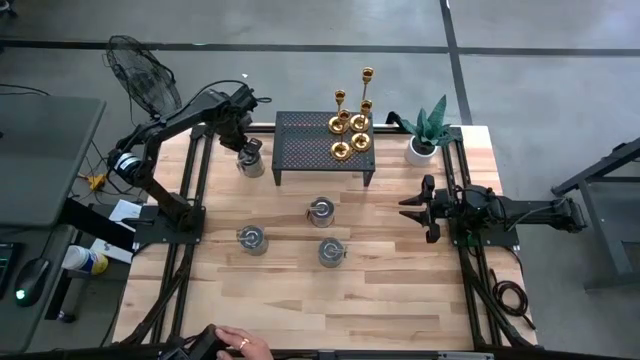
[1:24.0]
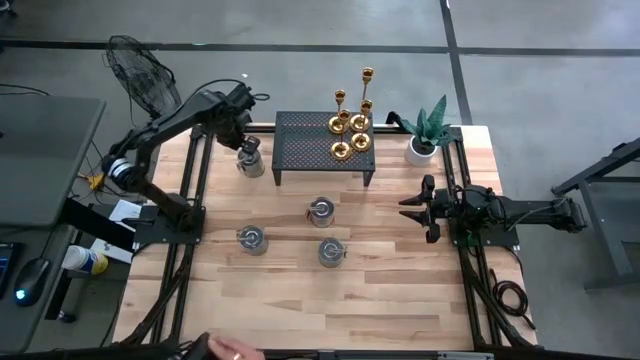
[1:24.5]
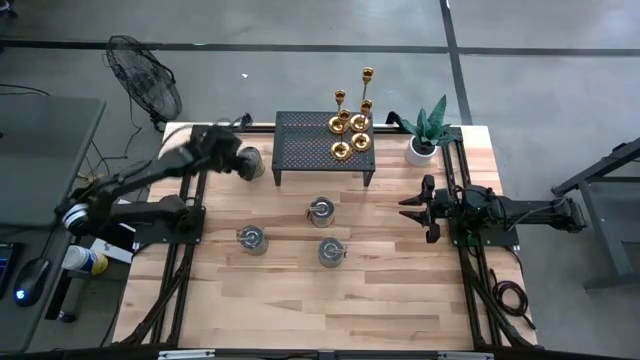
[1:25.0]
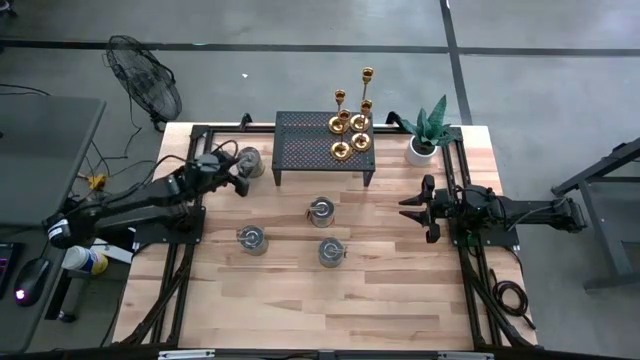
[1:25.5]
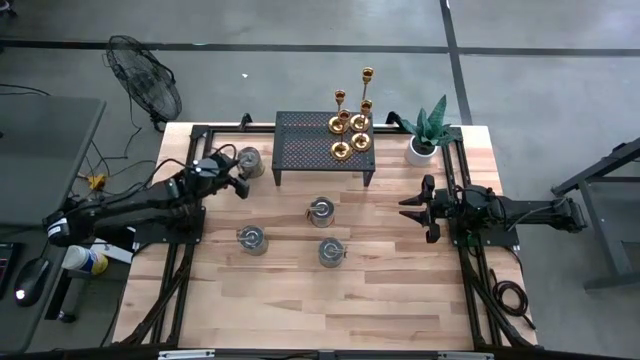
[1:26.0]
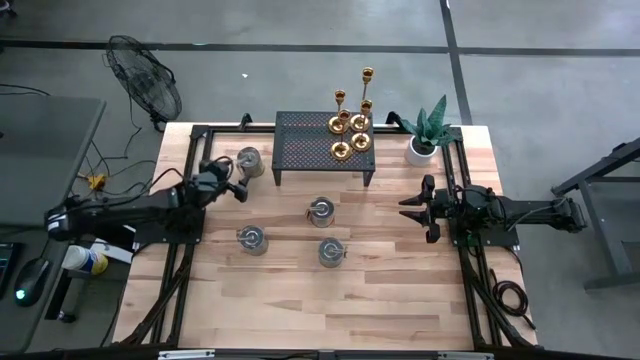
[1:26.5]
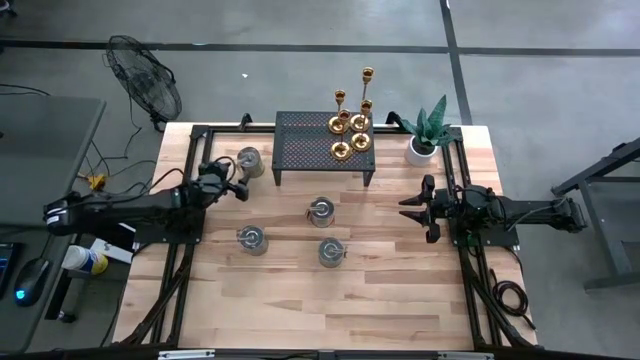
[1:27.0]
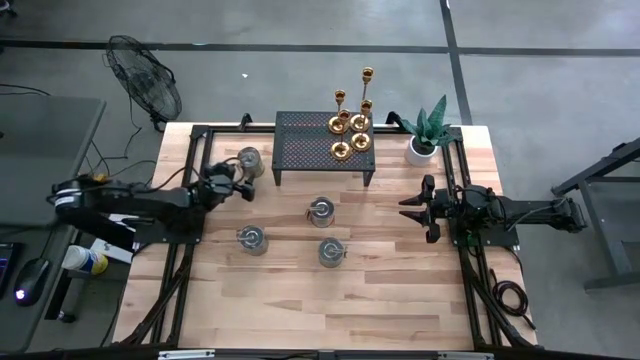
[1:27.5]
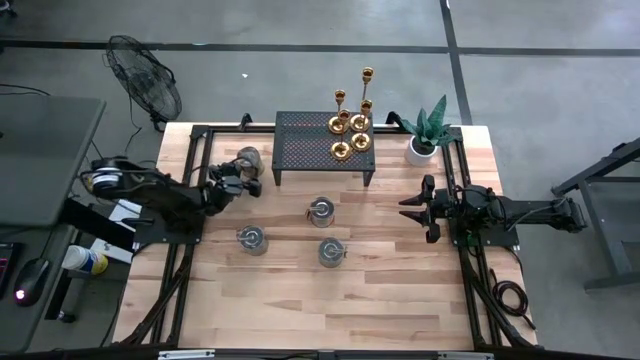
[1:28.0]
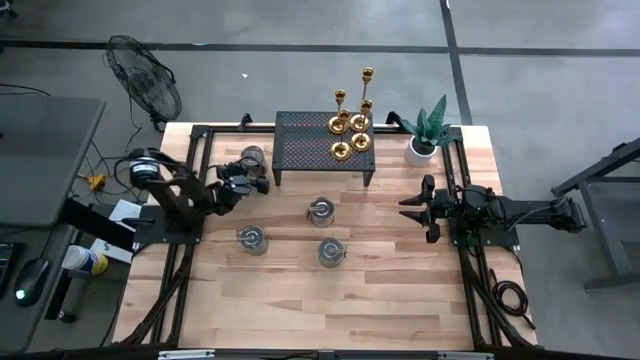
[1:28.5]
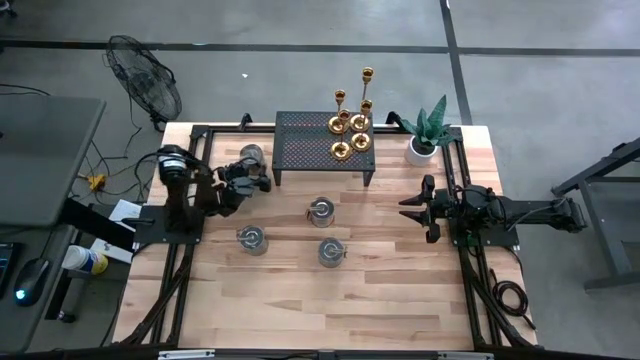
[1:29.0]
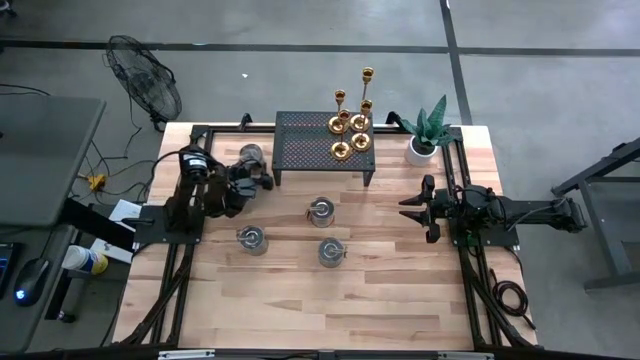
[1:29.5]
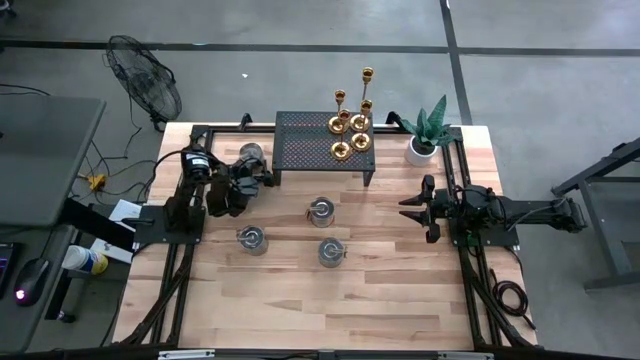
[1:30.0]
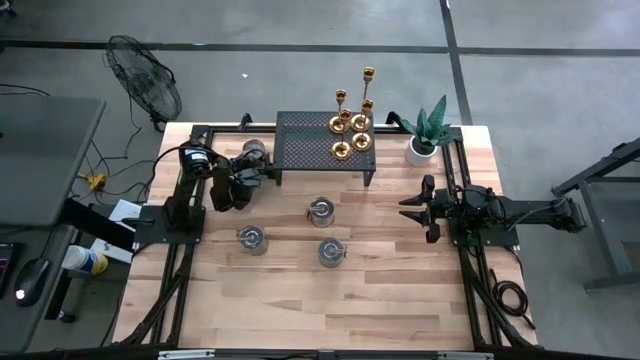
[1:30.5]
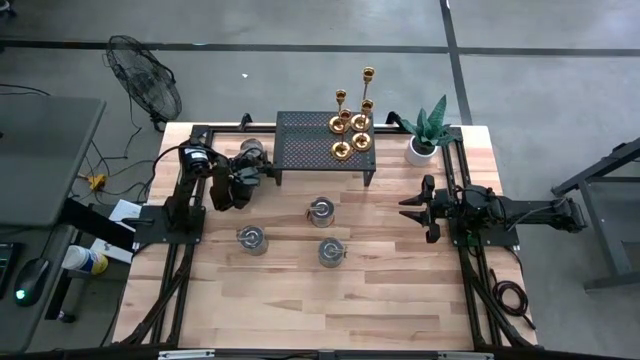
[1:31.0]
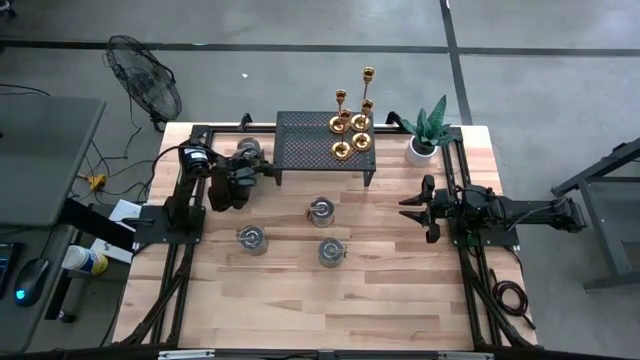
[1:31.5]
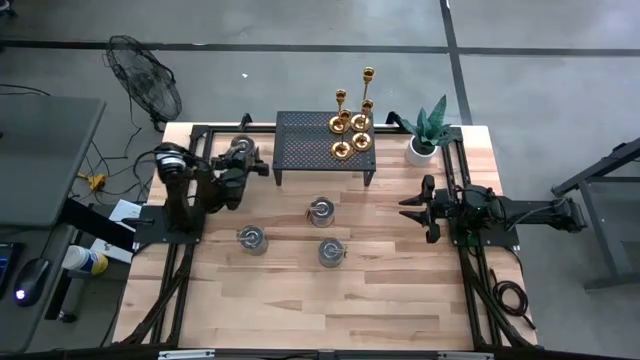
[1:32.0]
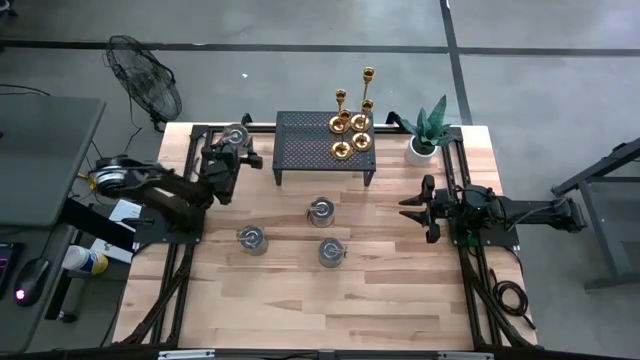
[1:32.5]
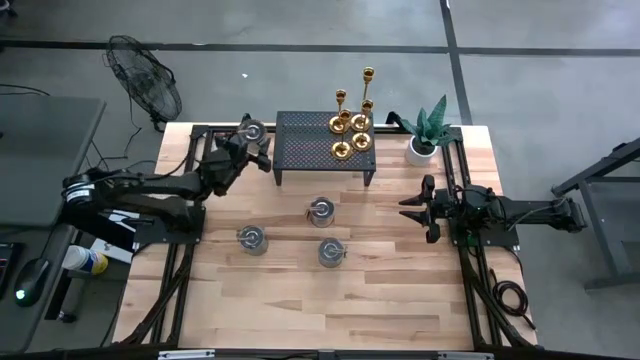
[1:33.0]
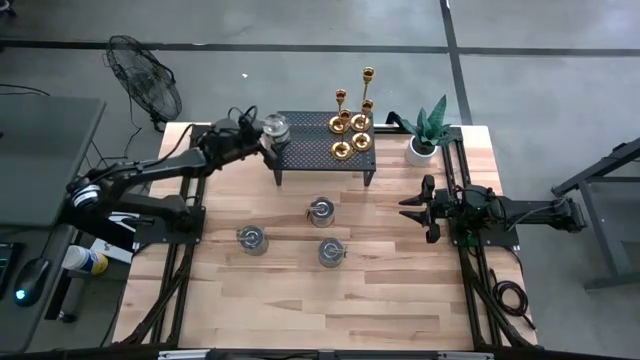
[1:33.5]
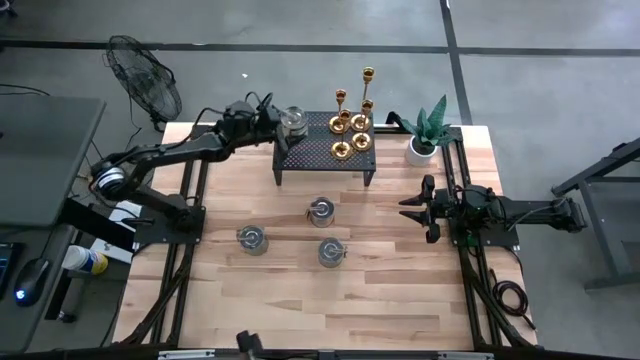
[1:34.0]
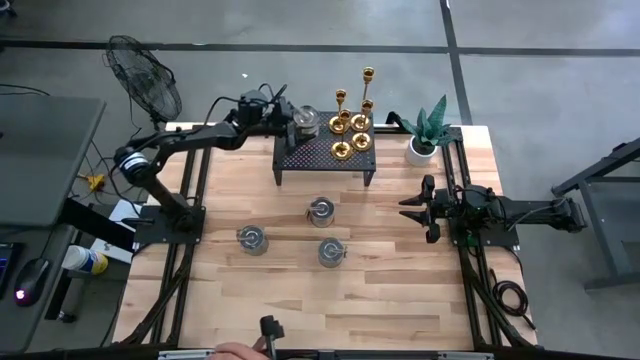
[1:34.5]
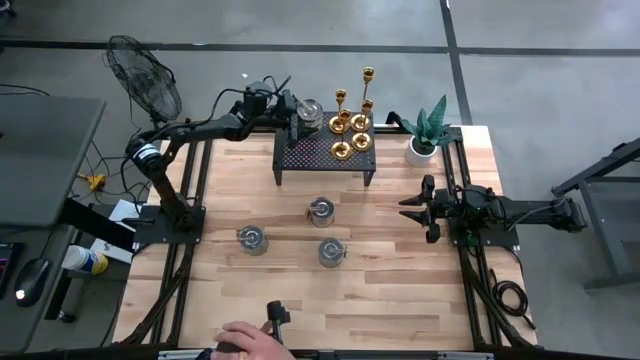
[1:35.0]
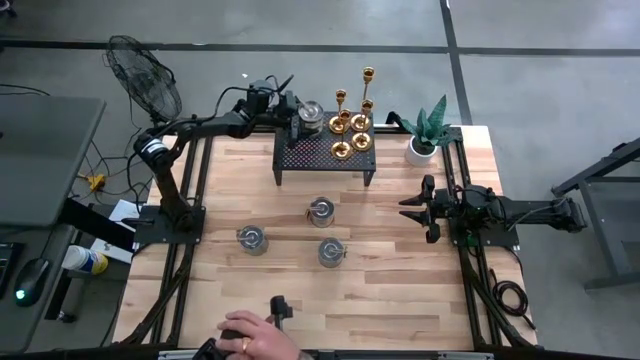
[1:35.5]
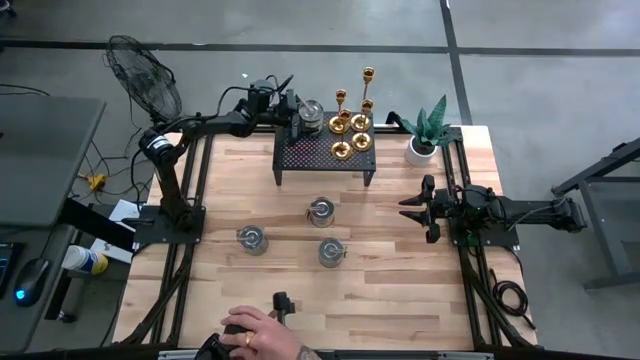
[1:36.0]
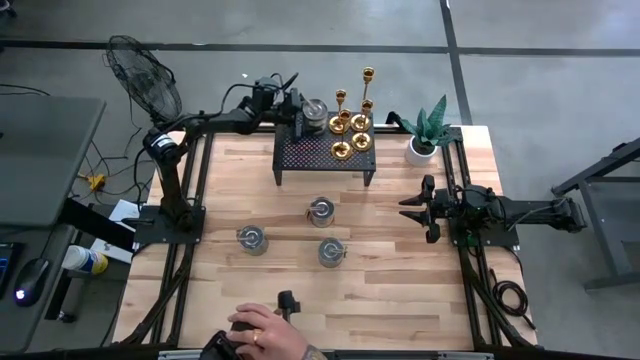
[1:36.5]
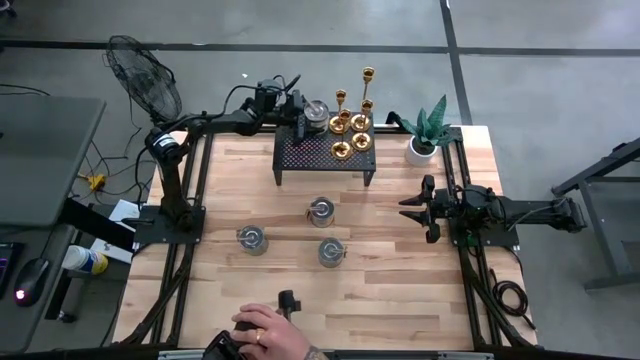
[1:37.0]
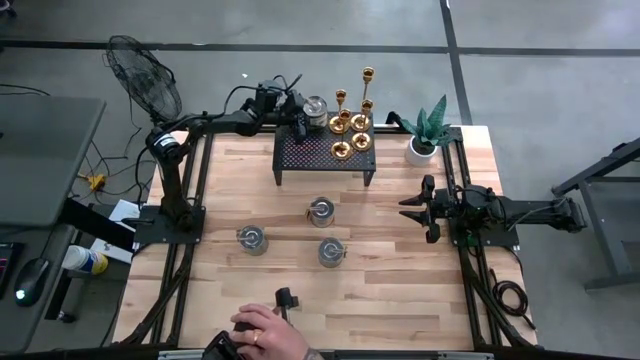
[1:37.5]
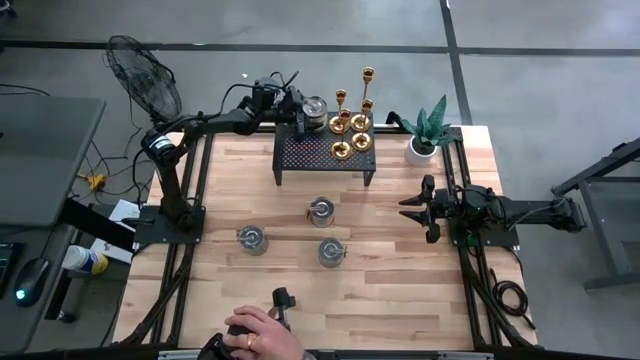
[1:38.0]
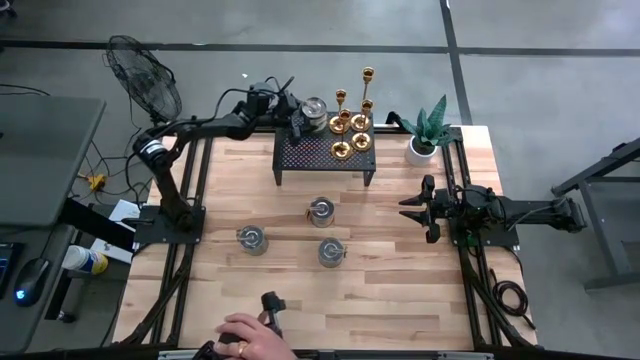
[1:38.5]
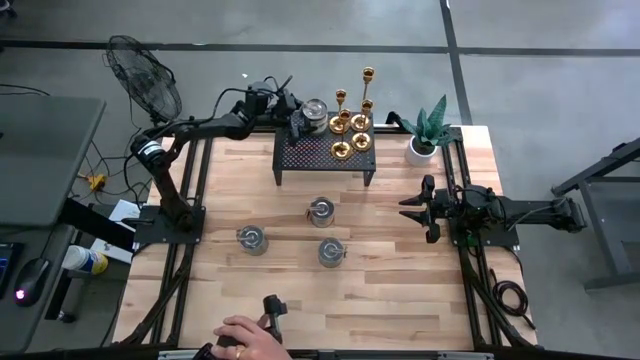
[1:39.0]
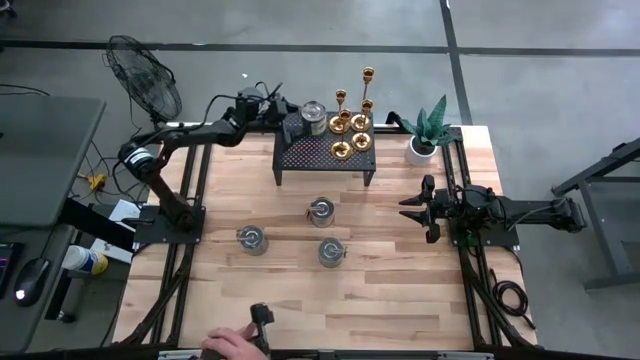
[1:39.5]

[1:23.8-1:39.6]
Task: Pick & Place candle stick holders
Put the scented candle on the shelf

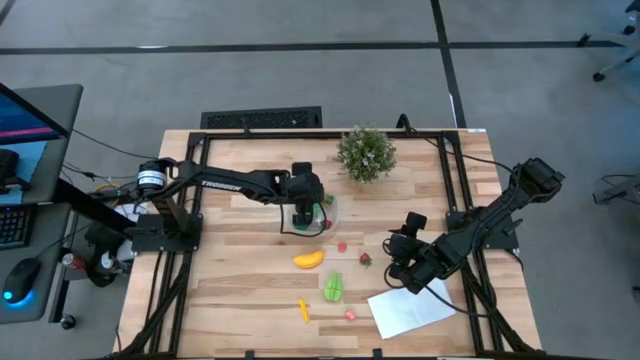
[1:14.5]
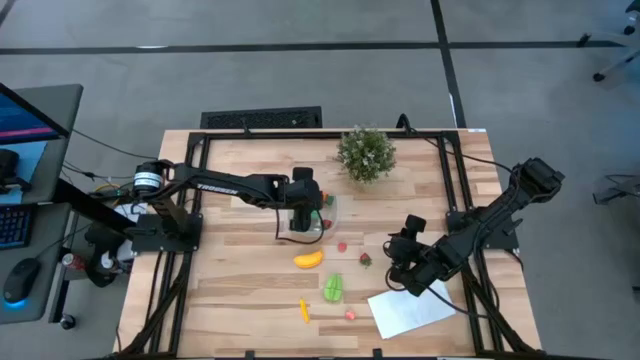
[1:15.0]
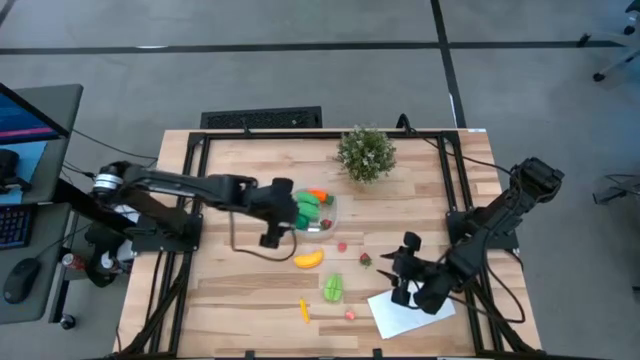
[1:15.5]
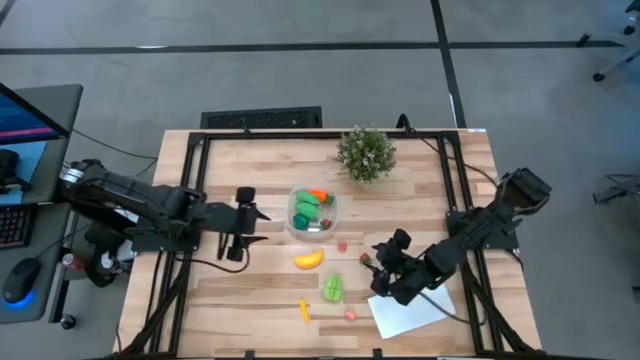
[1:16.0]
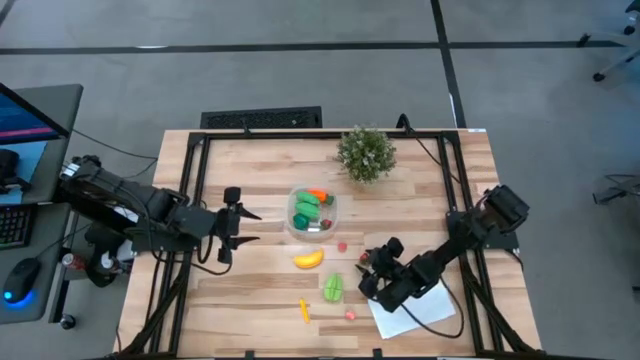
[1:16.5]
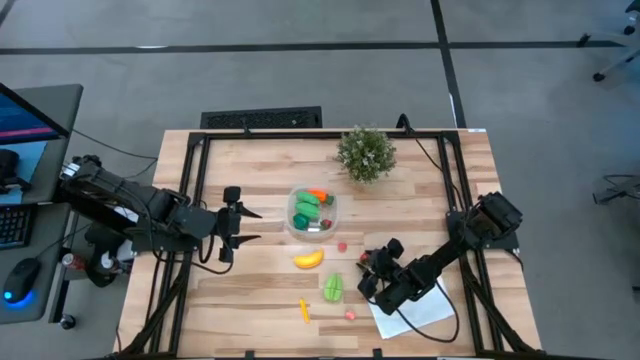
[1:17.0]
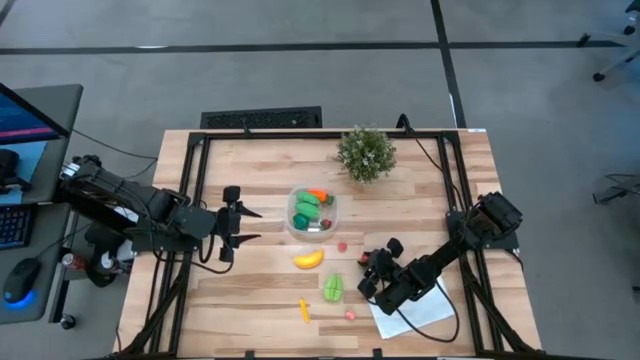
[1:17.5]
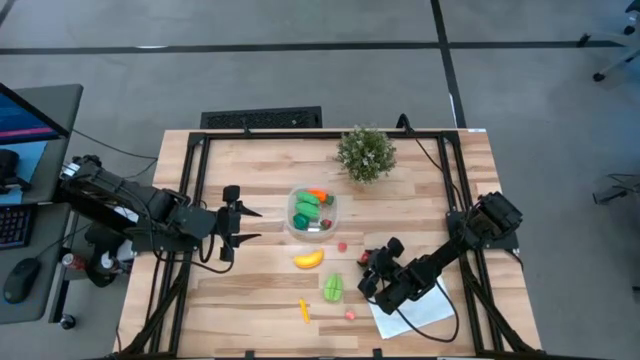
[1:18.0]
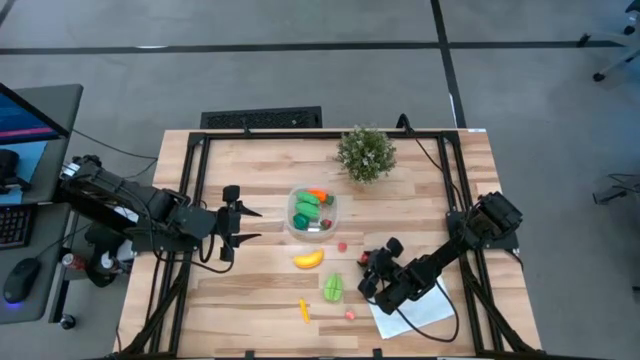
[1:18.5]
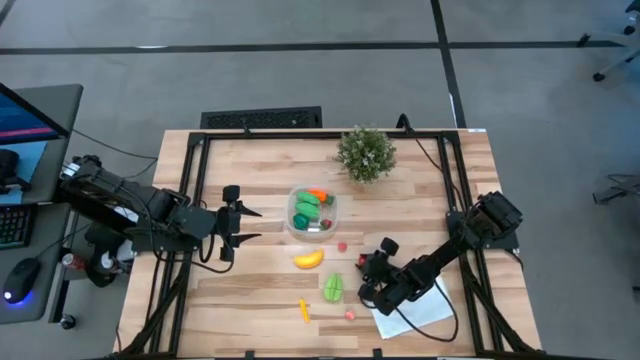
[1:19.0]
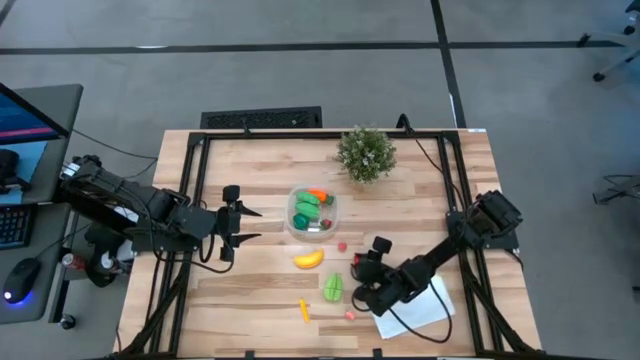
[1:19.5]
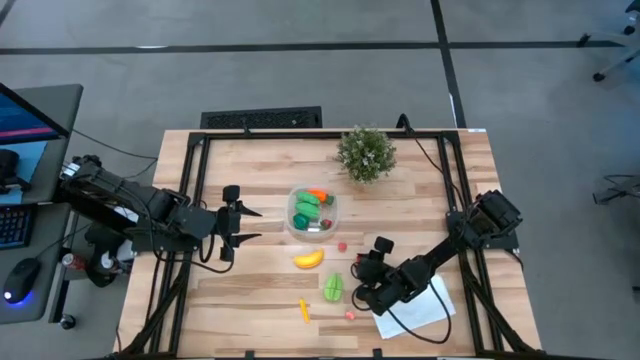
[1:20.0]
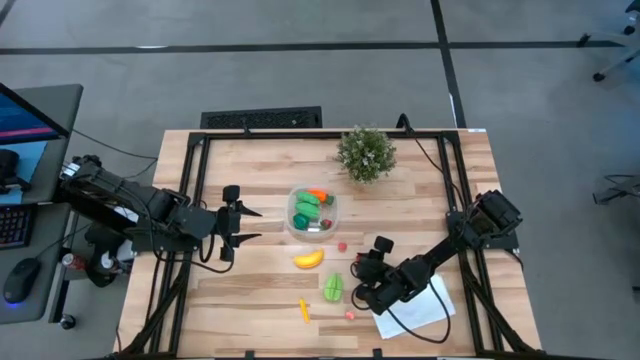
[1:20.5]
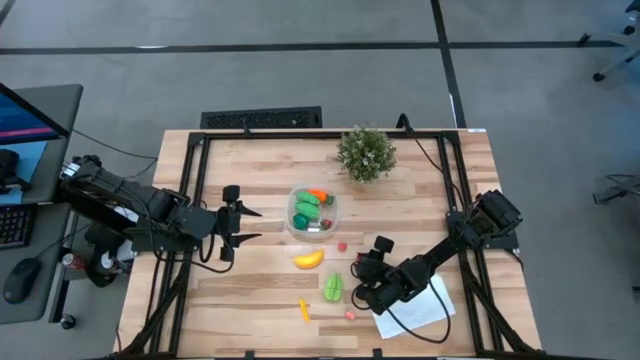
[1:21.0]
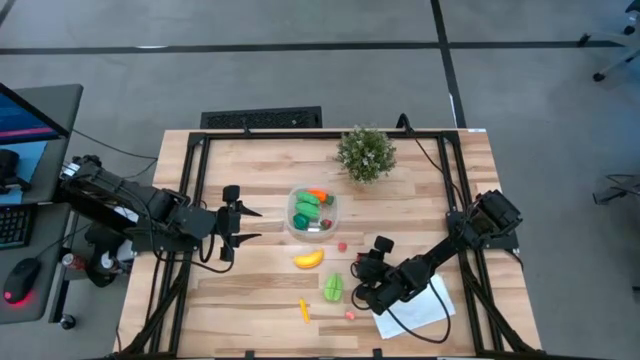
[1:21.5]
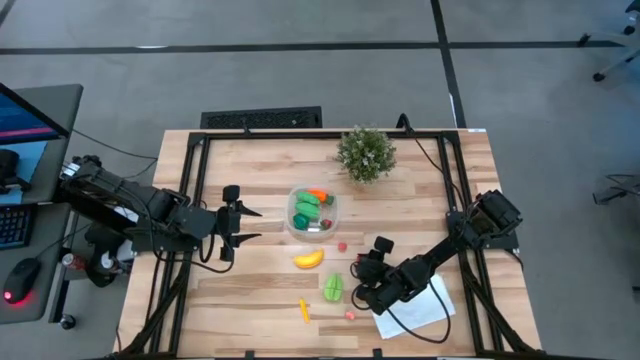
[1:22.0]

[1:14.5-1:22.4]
Task: Pick and placing Produce into tupperware
Put the red strawberry into the transparent container
